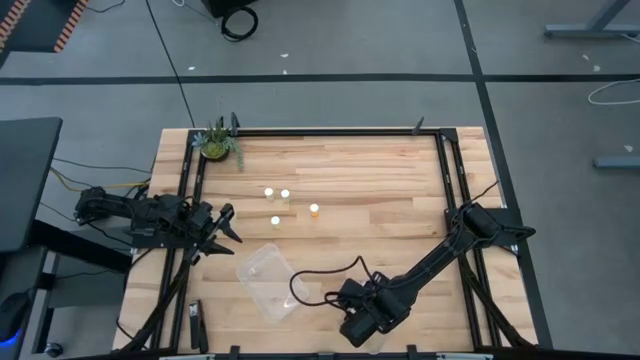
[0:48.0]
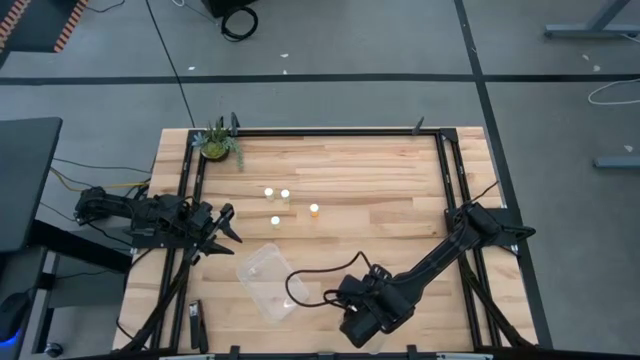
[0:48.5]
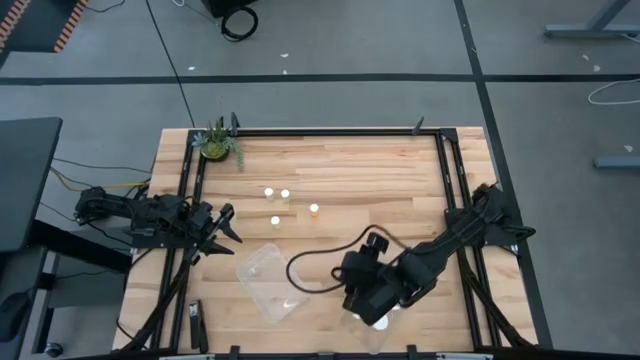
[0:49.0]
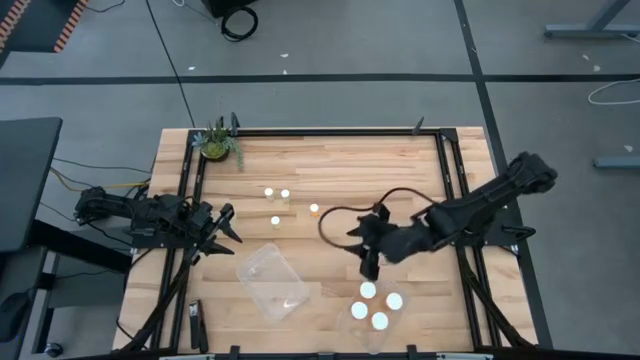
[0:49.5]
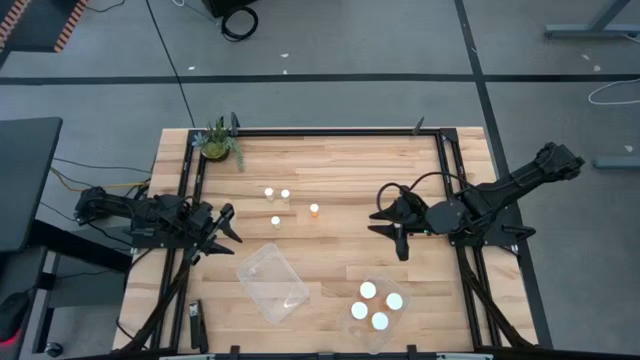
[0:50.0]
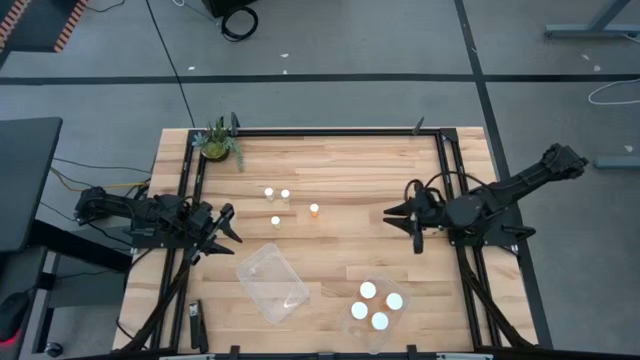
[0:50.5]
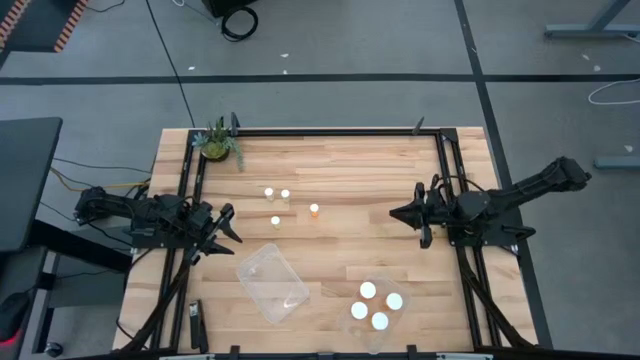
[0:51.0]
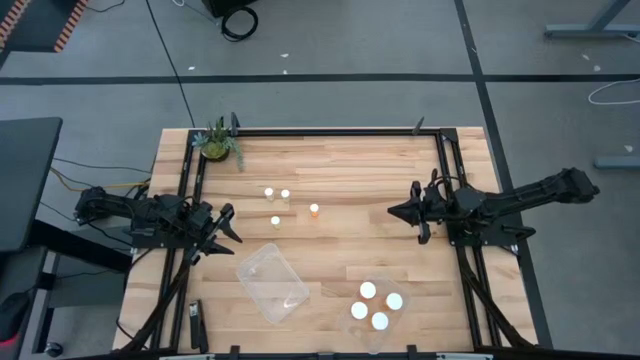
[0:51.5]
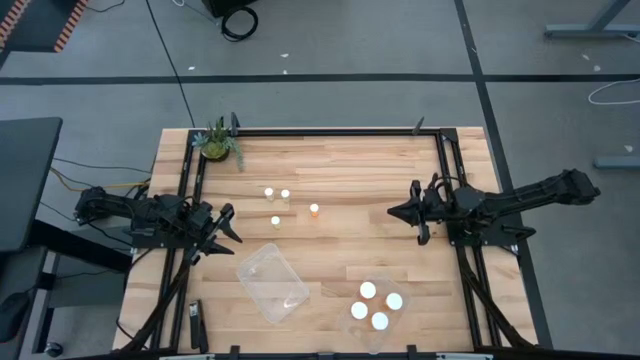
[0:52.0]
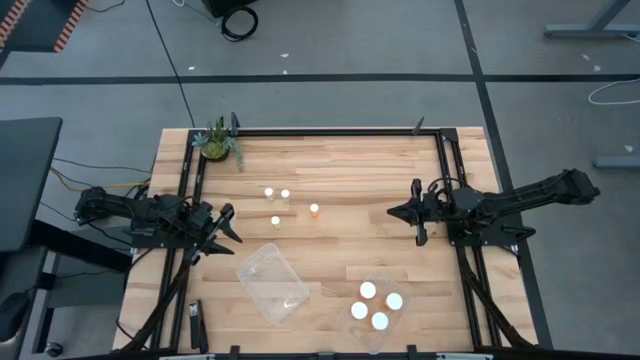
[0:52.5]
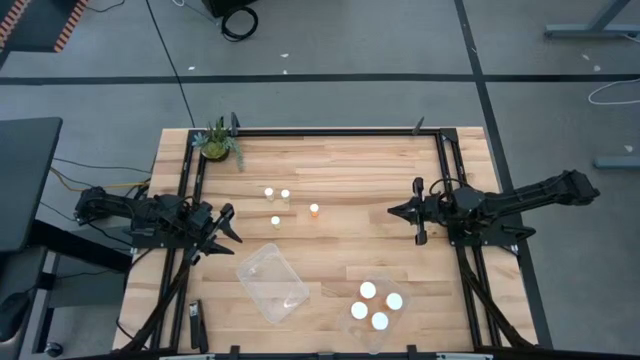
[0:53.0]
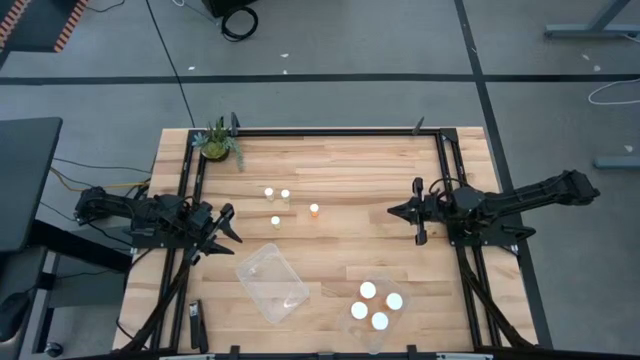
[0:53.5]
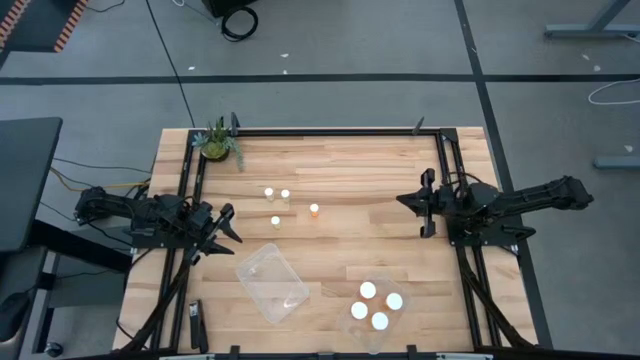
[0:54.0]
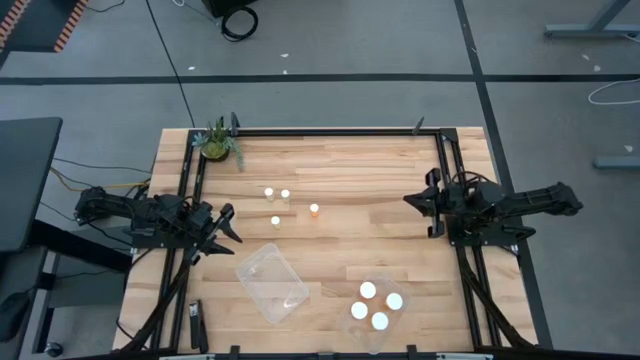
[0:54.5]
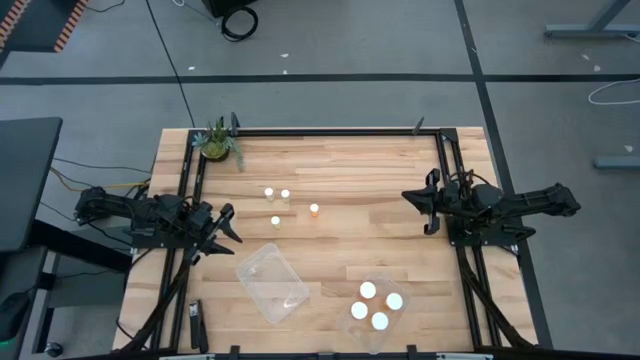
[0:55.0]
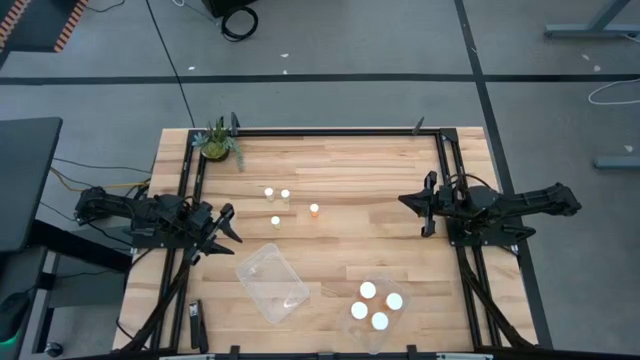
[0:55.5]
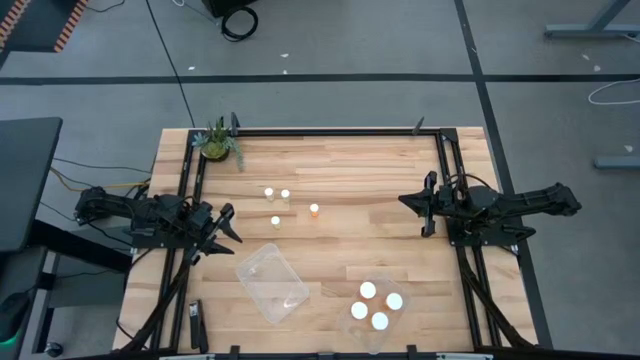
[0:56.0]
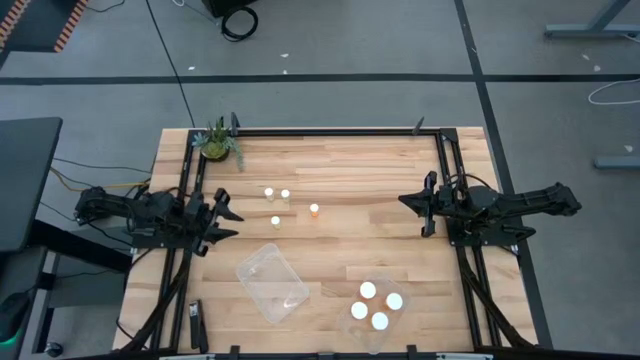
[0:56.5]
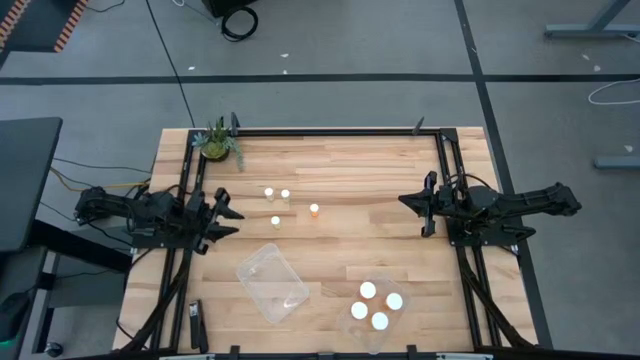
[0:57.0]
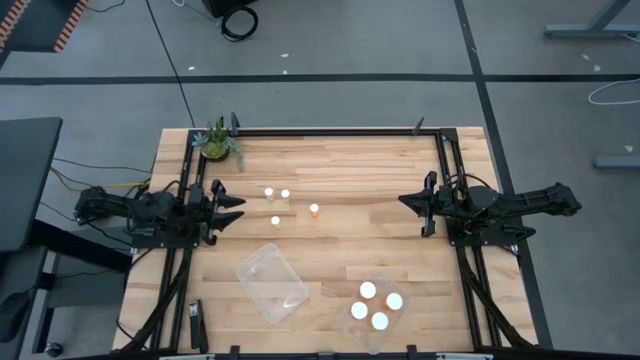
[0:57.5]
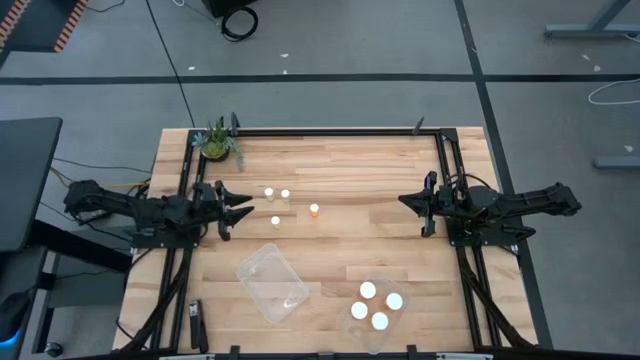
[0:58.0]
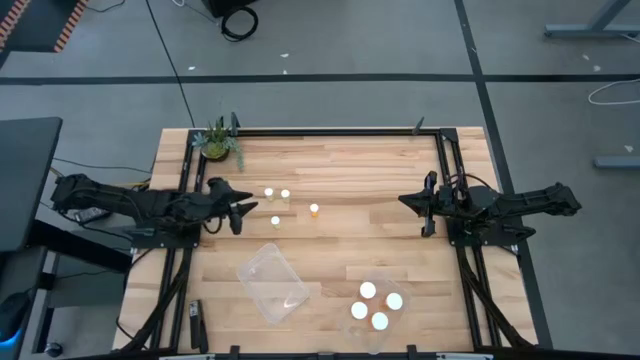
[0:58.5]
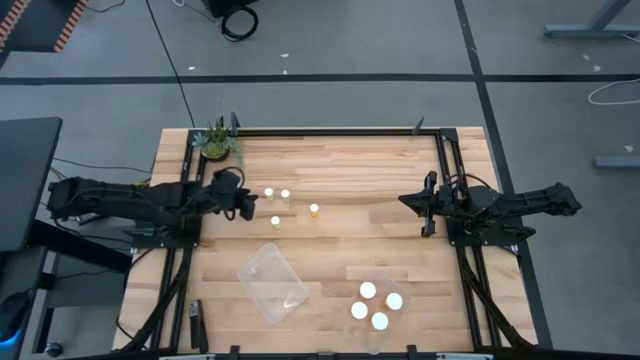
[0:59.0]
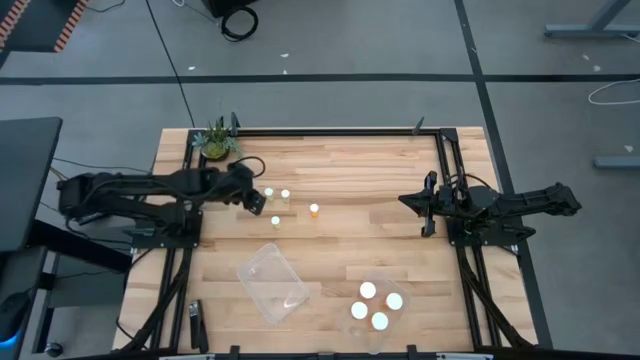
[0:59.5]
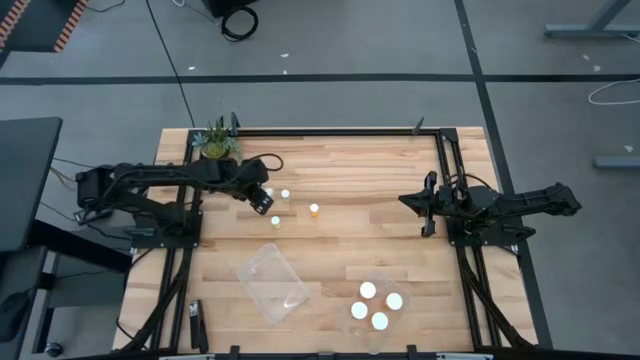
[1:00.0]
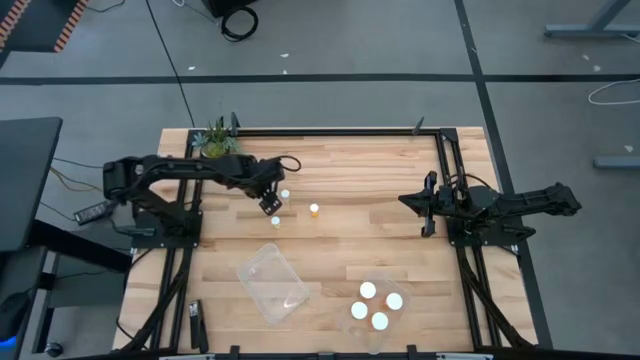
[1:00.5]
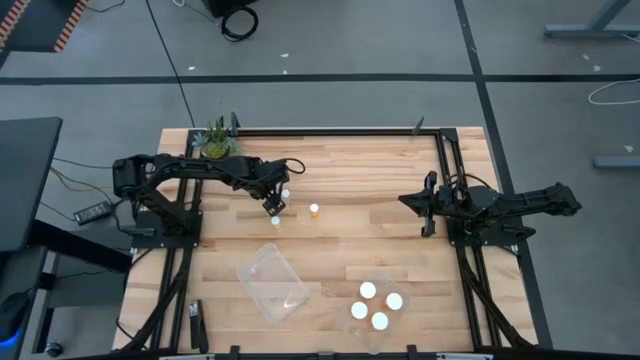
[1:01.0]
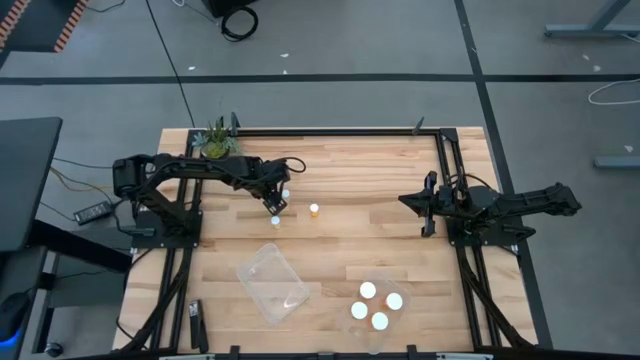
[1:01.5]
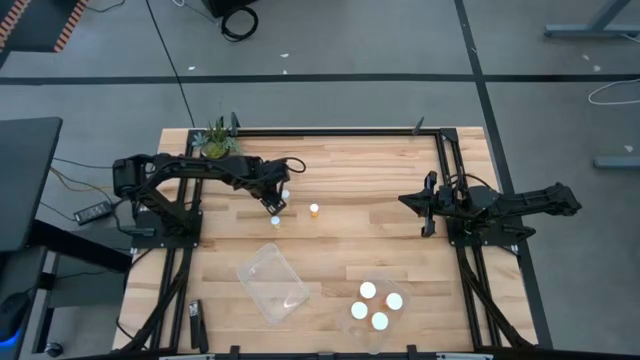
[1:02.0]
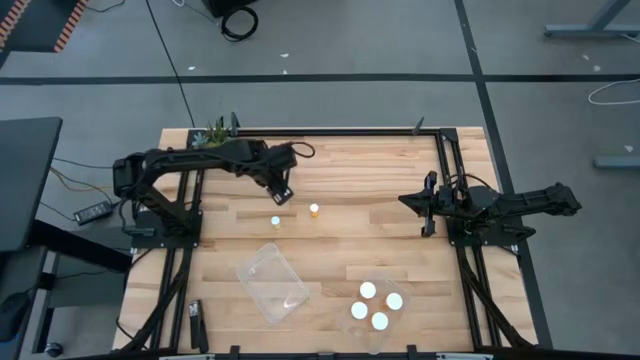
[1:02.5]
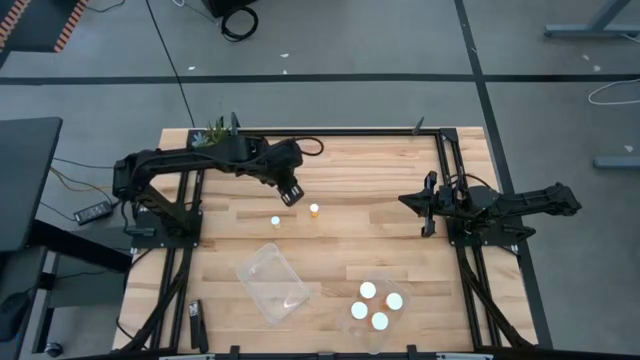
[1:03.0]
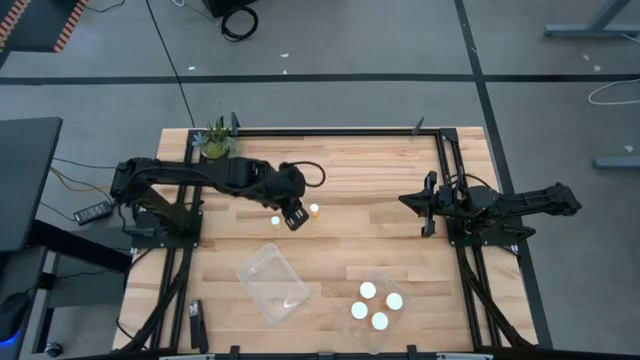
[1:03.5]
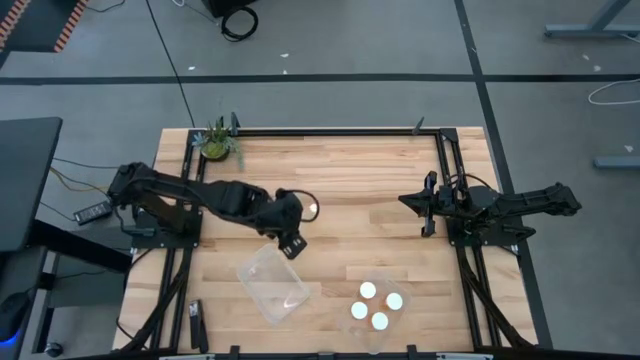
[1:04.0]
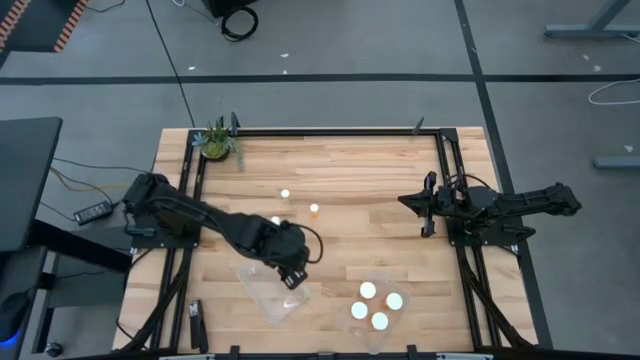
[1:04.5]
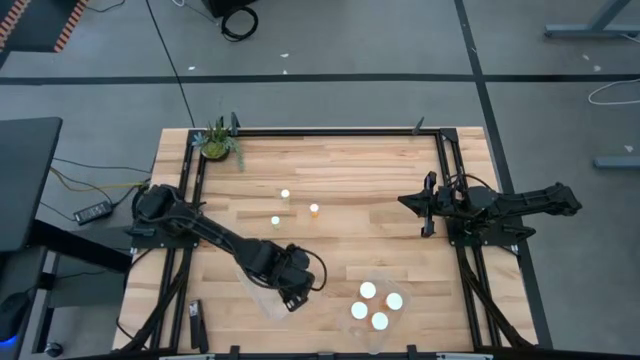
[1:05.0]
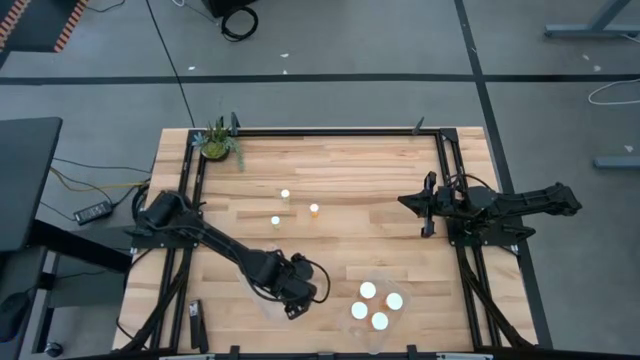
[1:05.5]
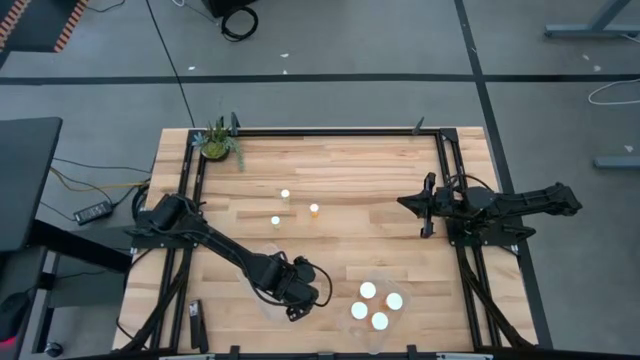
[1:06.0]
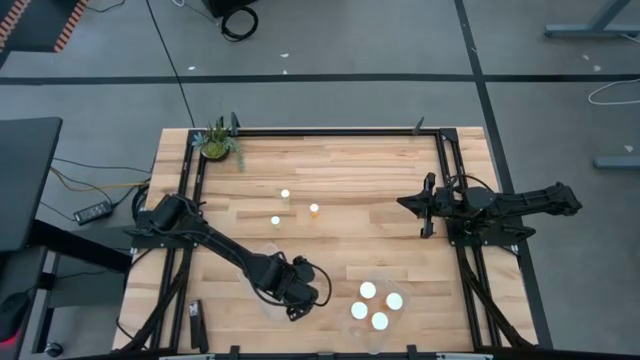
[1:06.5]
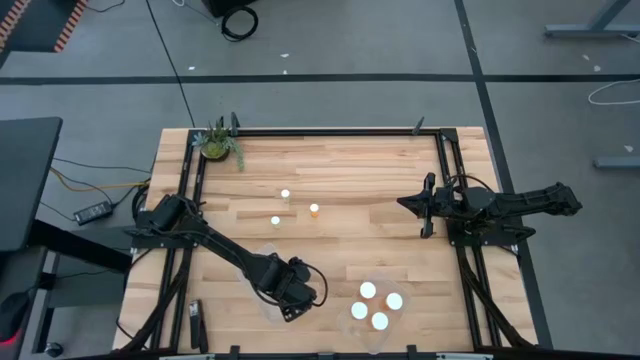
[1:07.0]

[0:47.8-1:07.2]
Task: Pick and place medicine bottles into bin by pill shape (circle, oval)
Put the small yellow pill bottle into the left transparent bin

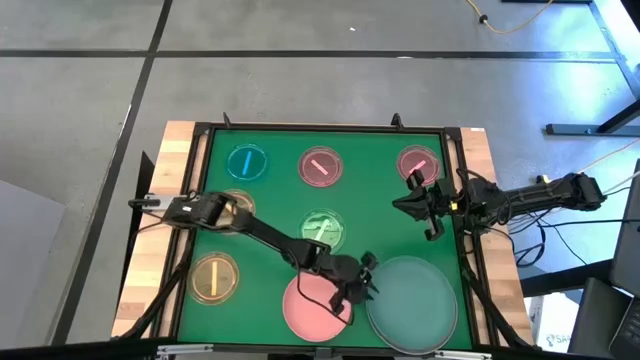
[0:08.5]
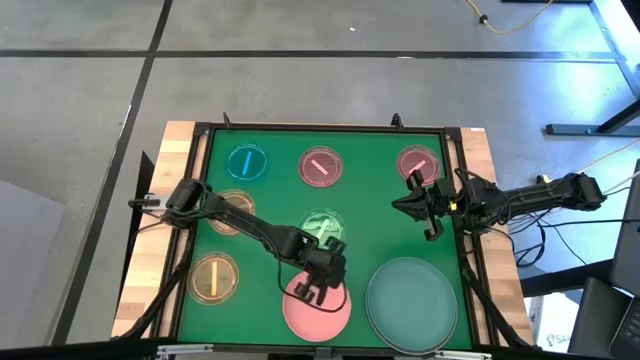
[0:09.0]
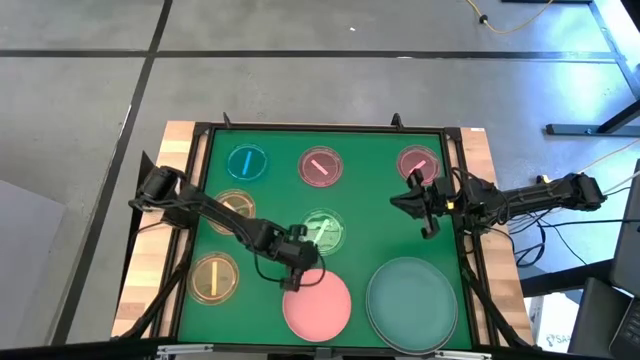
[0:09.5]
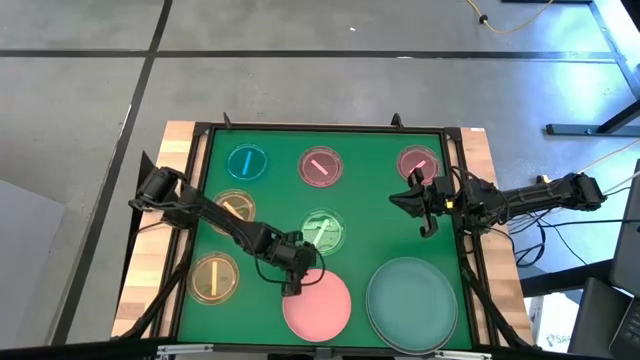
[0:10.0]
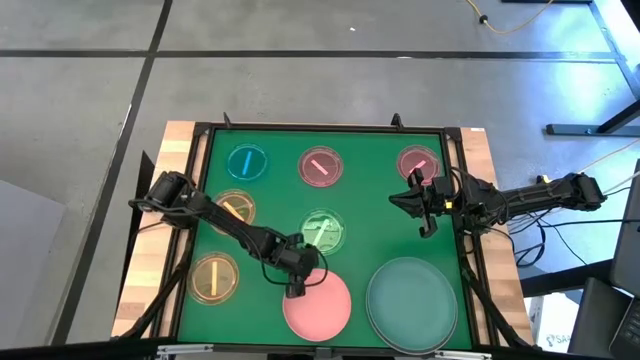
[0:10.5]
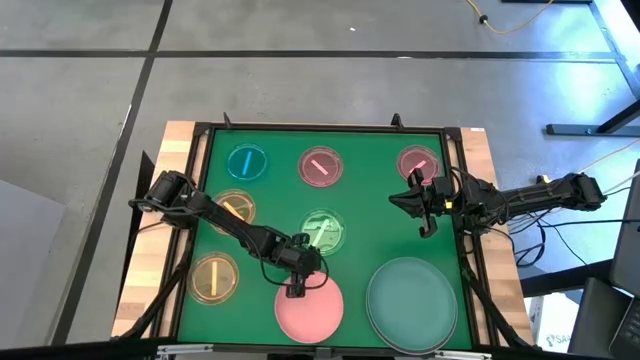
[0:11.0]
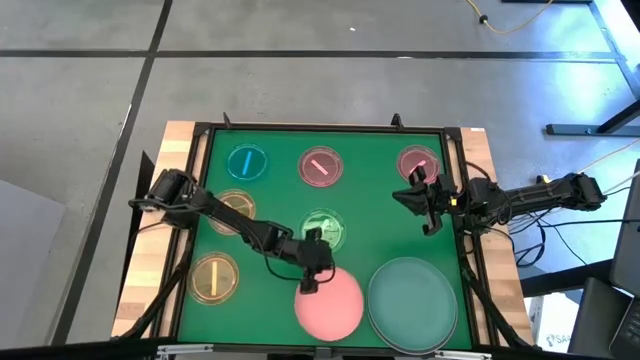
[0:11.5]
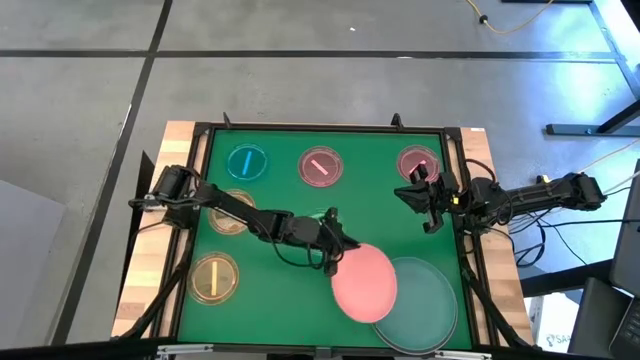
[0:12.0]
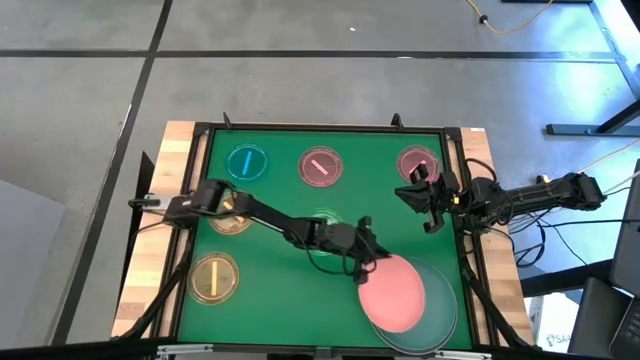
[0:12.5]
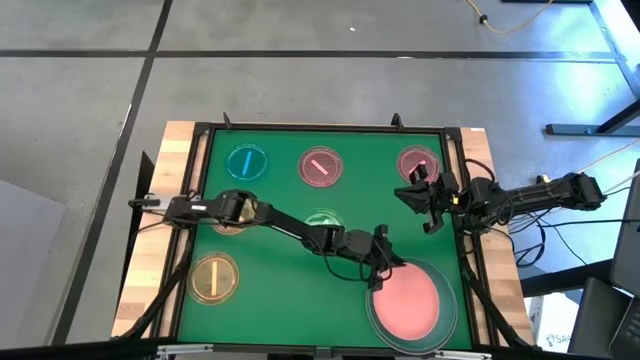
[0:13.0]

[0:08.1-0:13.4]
Task: Stack plastic plates
Stack the pink plate on top of the green plate
